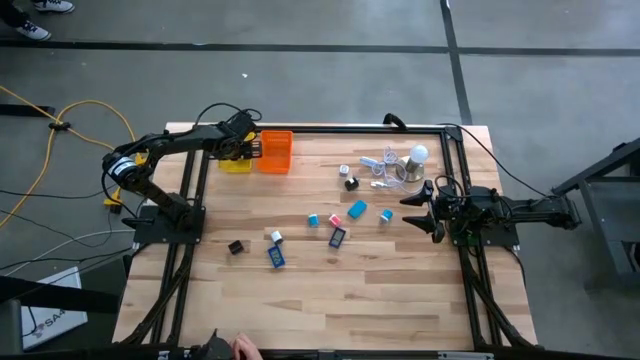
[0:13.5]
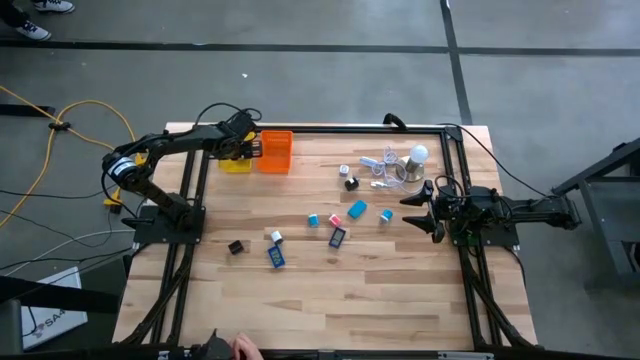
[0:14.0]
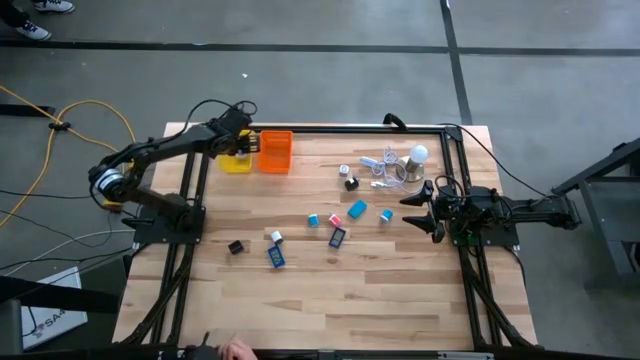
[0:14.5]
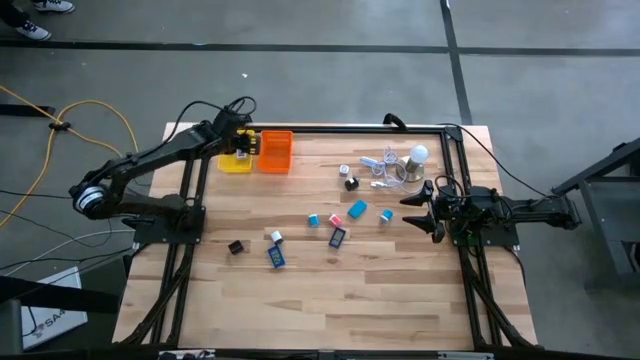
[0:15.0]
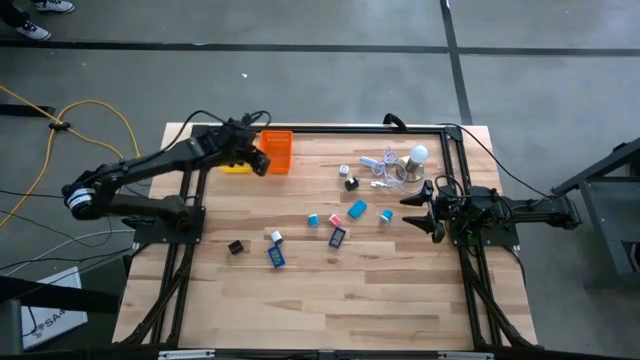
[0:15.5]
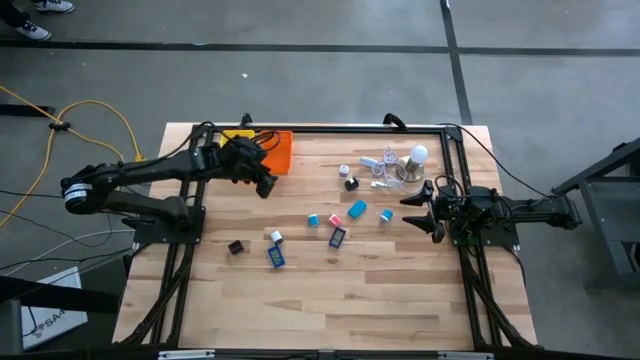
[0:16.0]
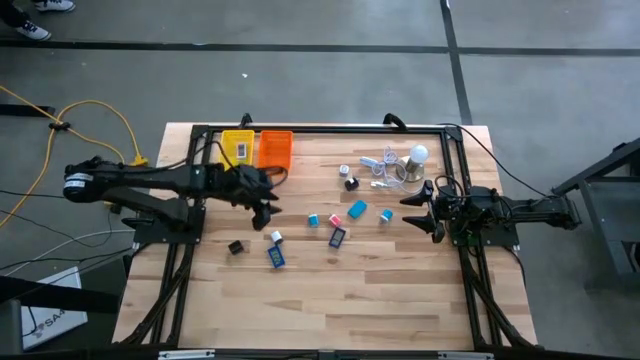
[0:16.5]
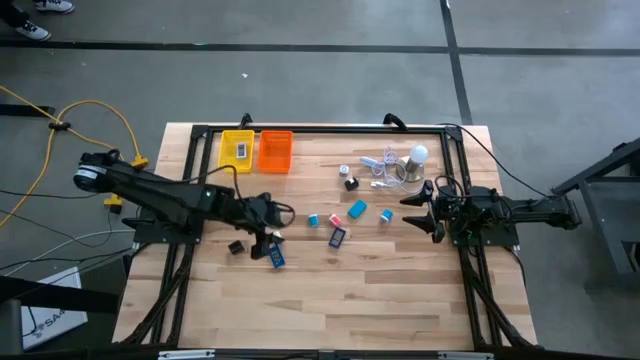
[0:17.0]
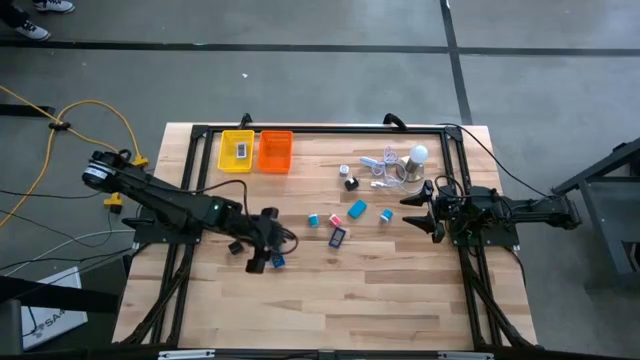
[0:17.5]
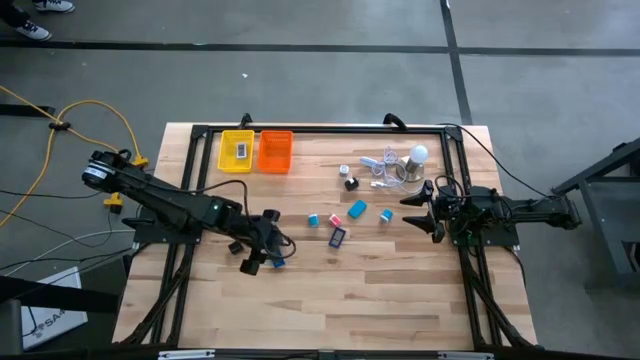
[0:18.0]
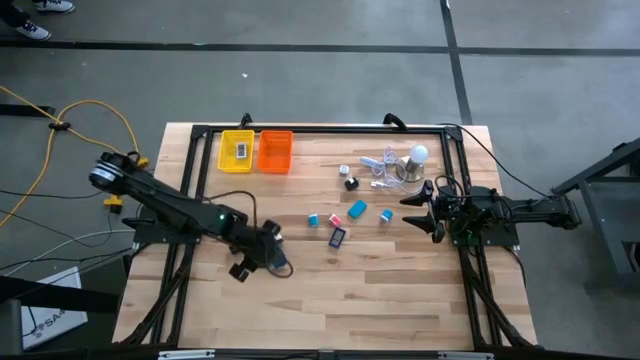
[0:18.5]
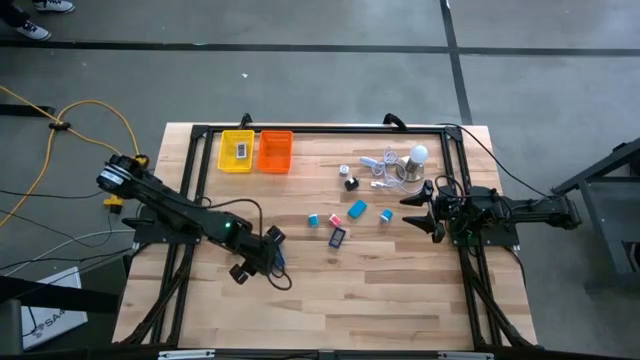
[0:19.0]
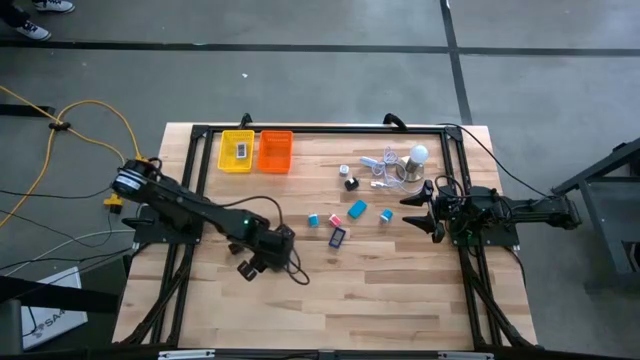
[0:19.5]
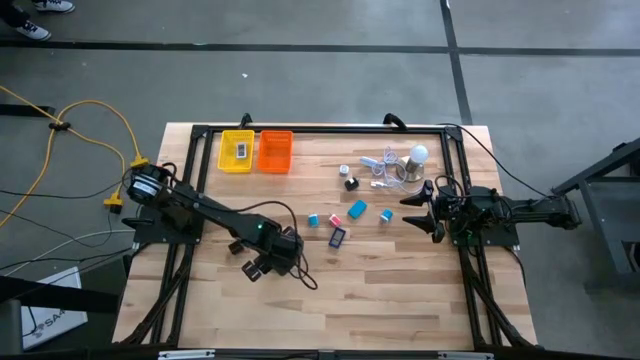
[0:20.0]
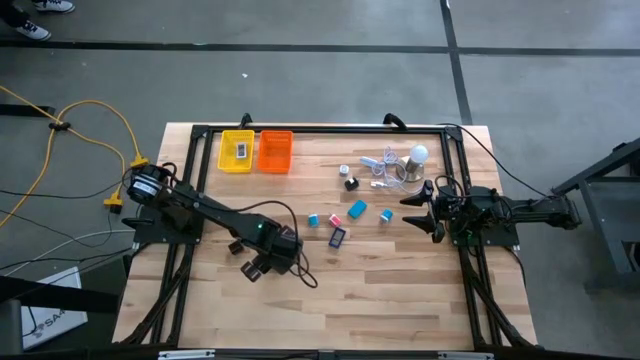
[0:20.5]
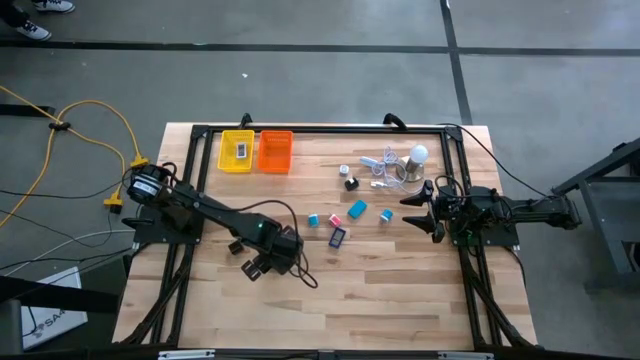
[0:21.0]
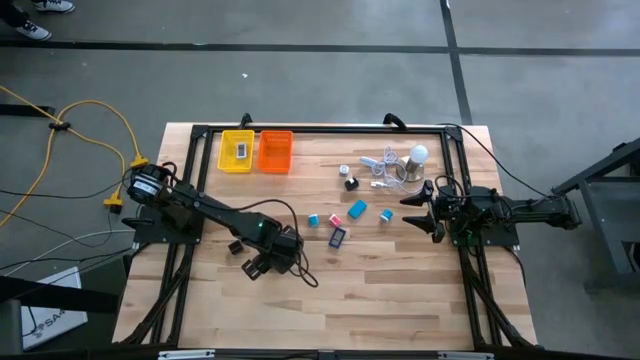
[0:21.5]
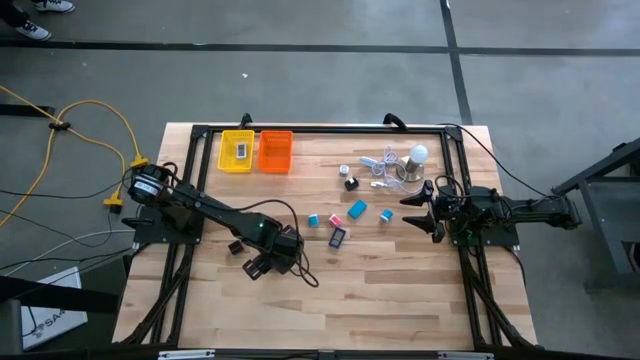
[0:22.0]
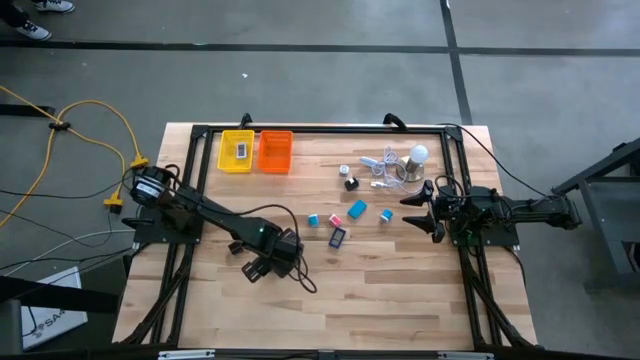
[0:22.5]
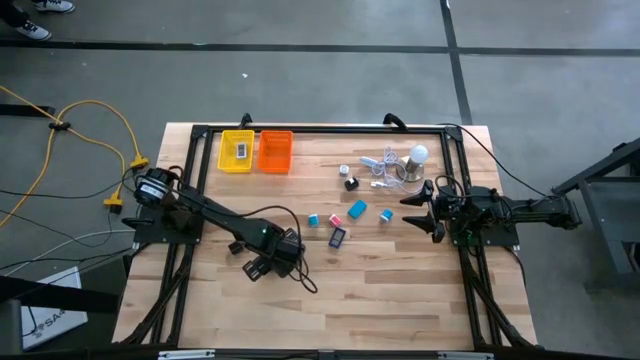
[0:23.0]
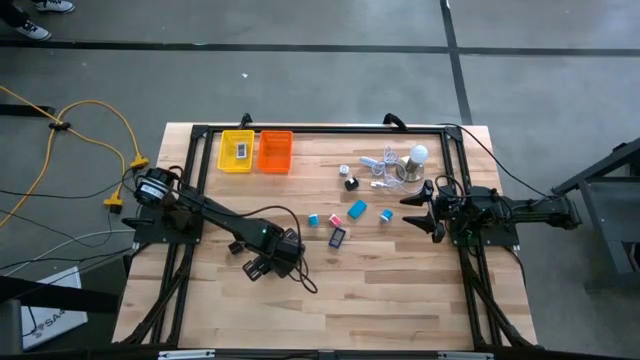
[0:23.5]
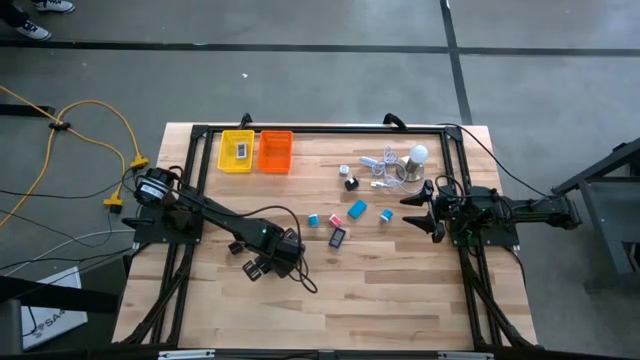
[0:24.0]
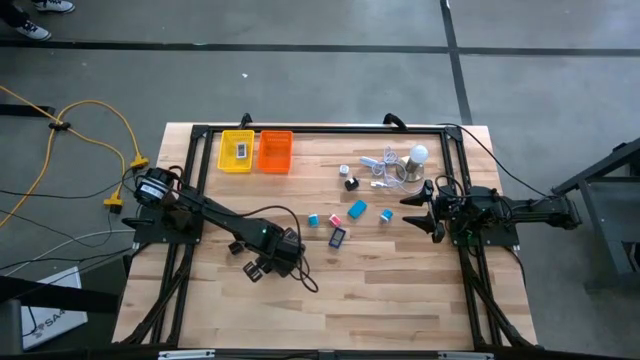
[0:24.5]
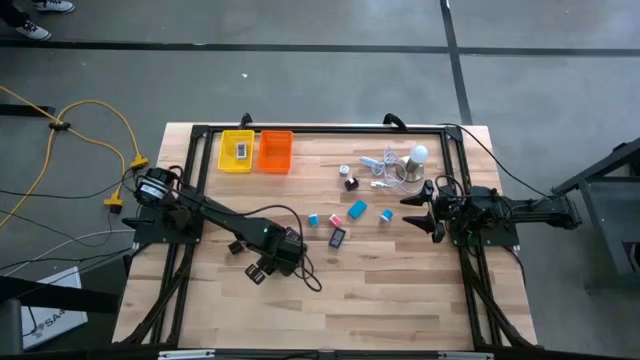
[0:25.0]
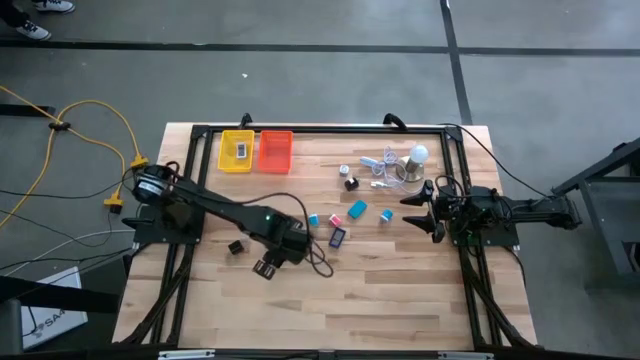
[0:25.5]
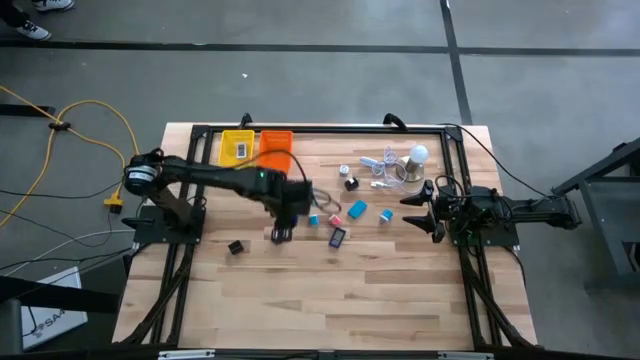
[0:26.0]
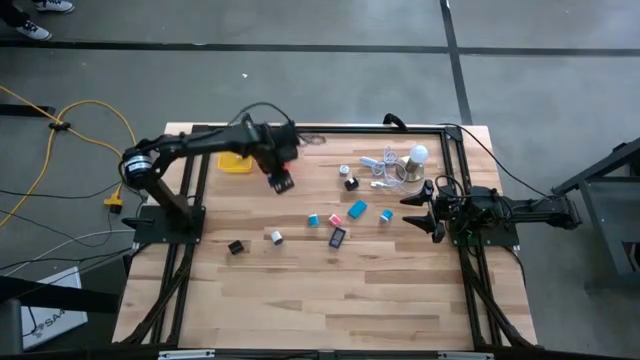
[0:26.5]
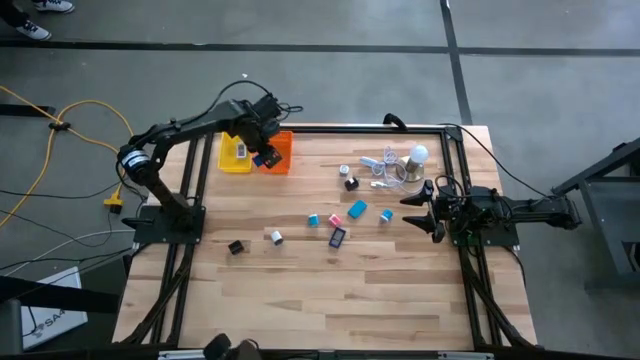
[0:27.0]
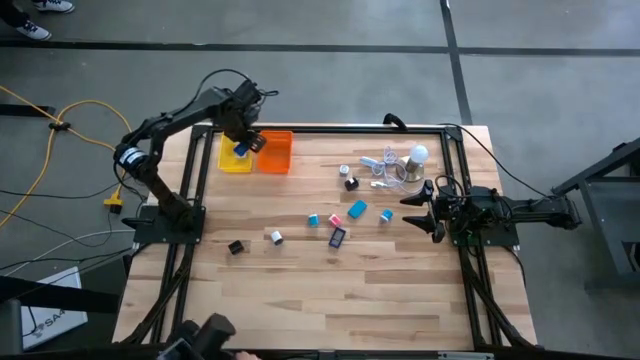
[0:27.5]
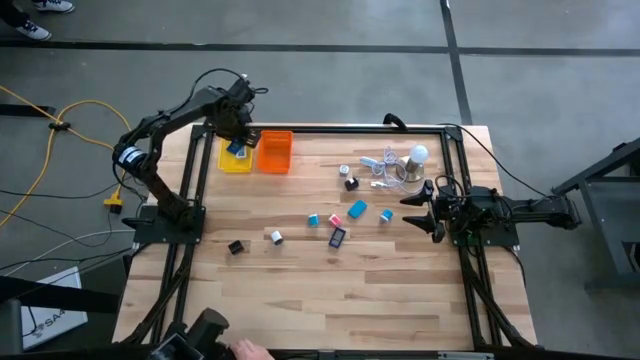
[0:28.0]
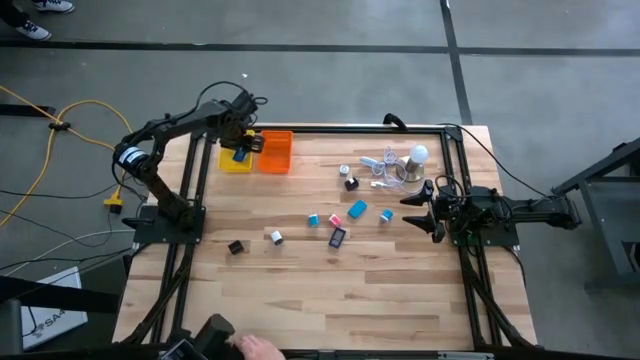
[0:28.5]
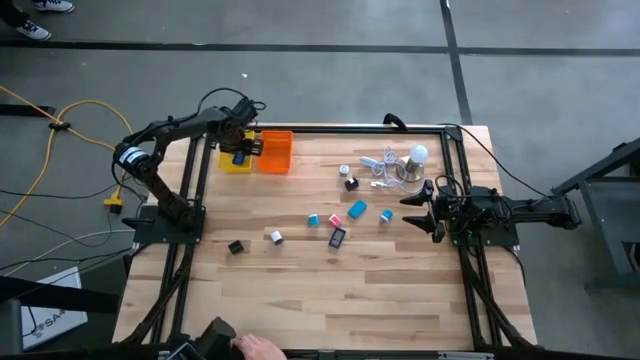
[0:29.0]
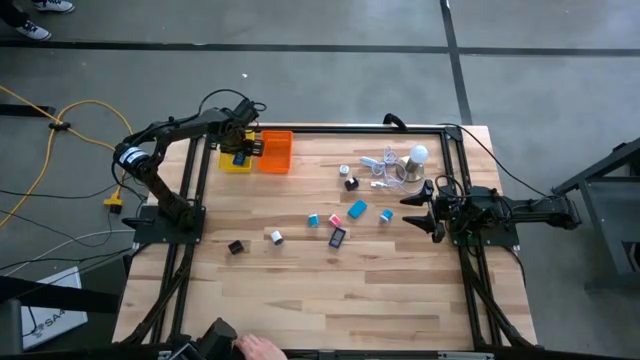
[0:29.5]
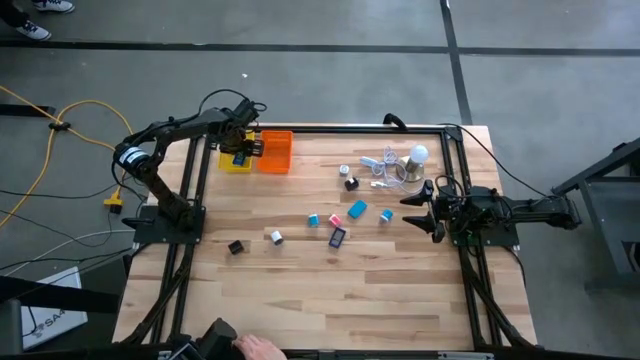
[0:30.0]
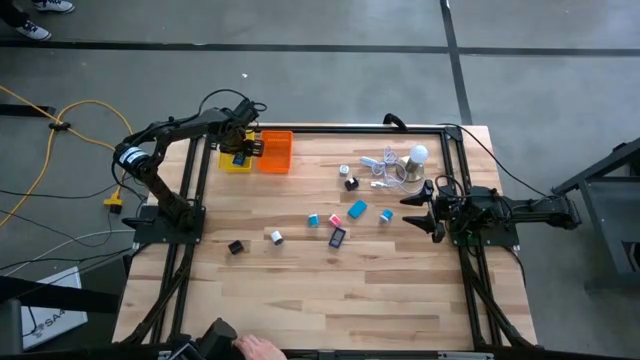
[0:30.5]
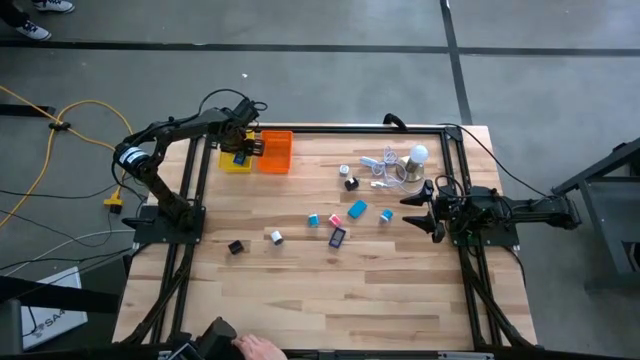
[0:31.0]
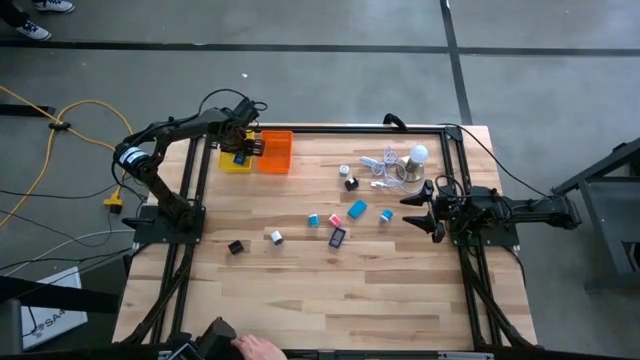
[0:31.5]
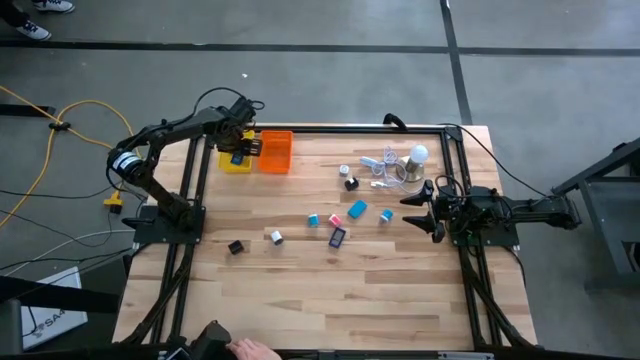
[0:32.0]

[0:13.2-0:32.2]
Task: Pick & Place Office items
Put the left blue digital clock into the yellow basket
